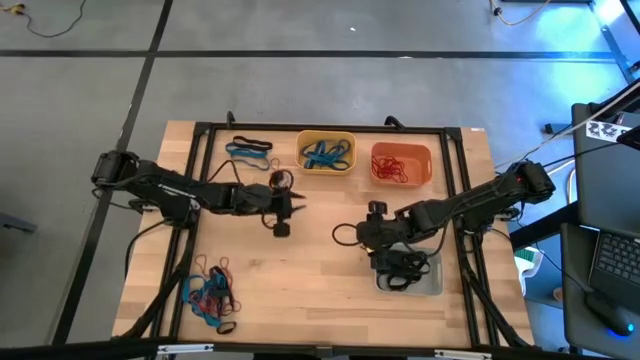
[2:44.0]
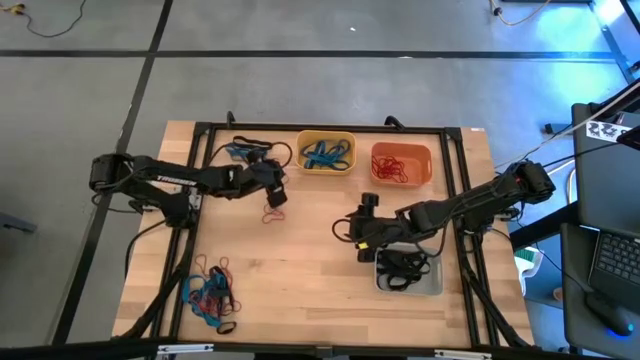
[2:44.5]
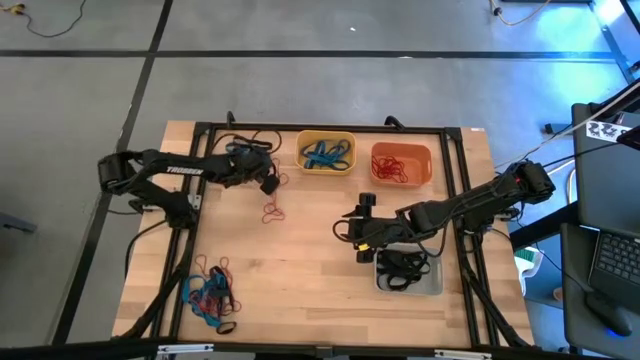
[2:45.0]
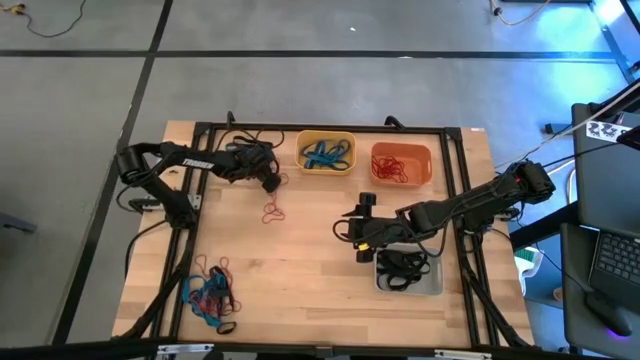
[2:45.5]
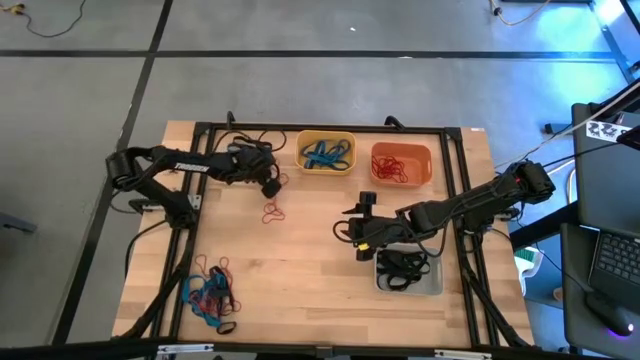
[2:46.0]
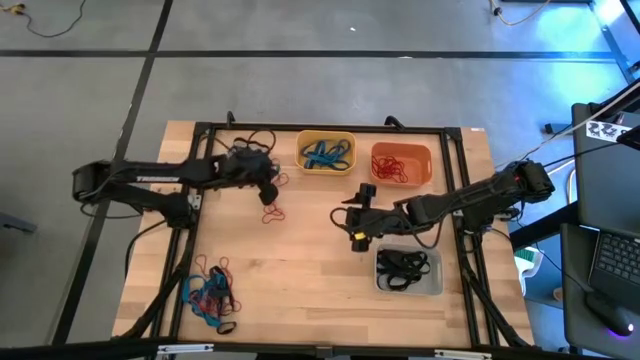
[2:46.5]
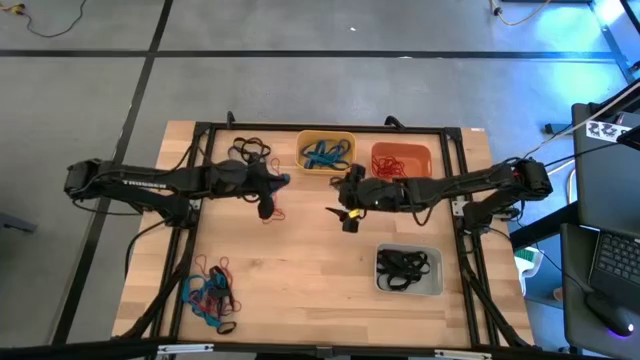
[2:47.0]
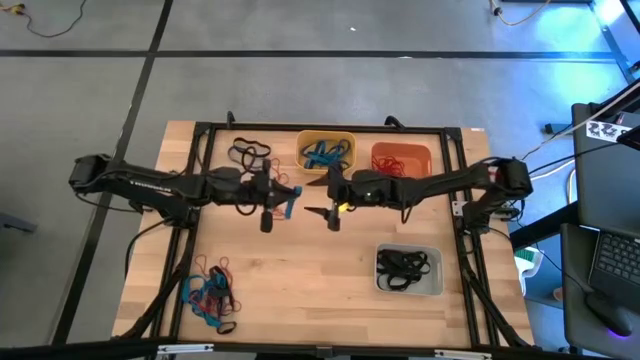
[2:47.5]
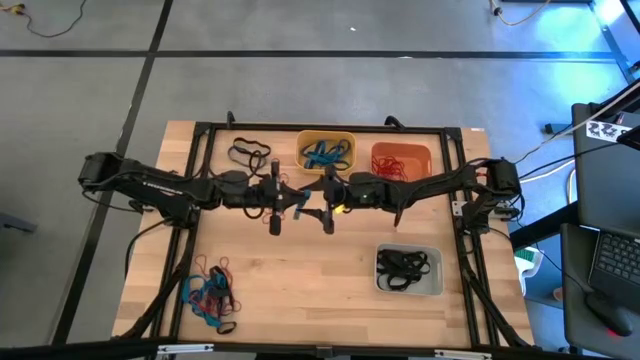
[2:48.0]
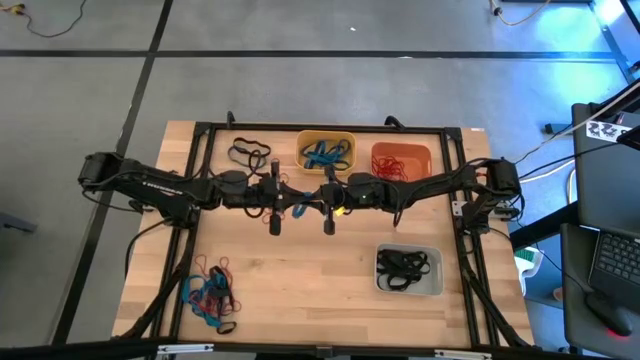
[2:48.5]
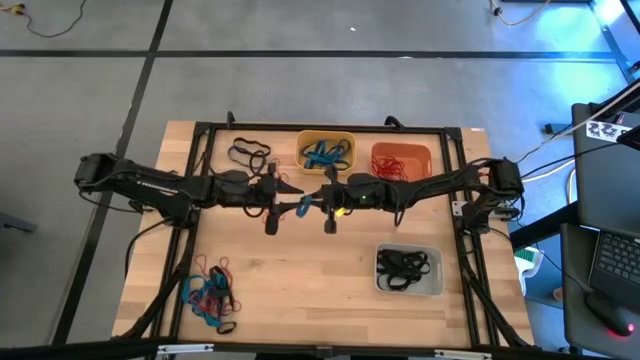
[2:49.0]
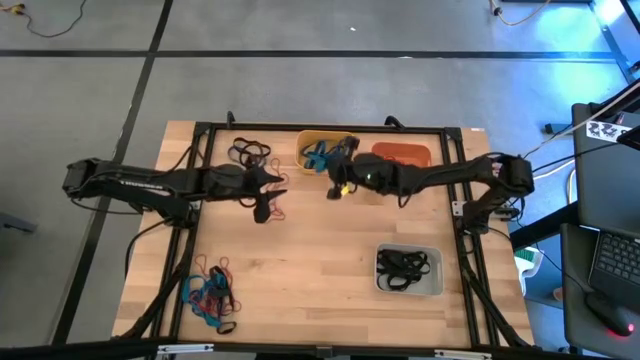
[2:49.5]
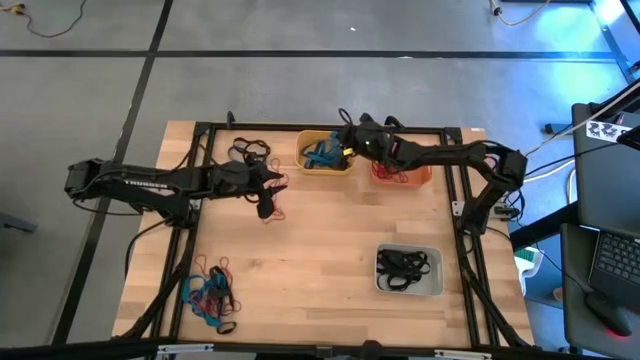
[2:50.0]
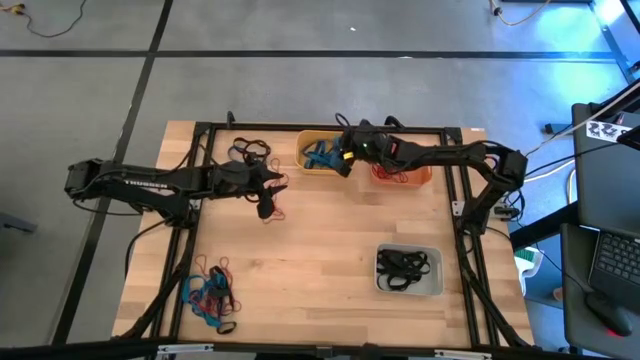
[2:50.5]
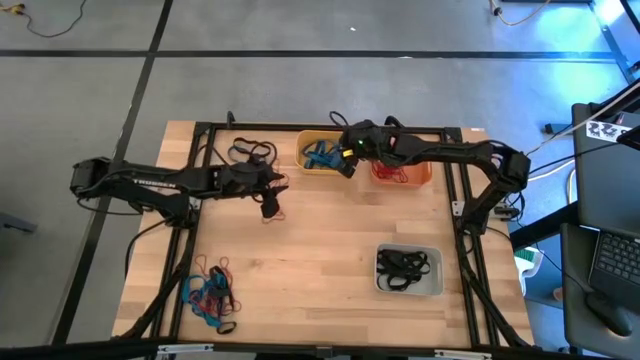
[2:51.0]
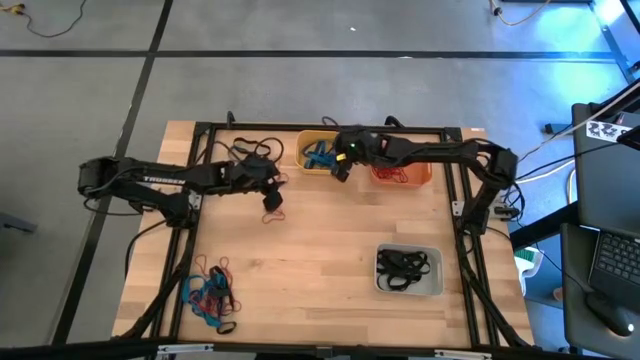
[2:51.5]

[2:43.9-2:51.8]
Task: Sort rubber bands into baskets
Put the blue rubber band into the yellow bin

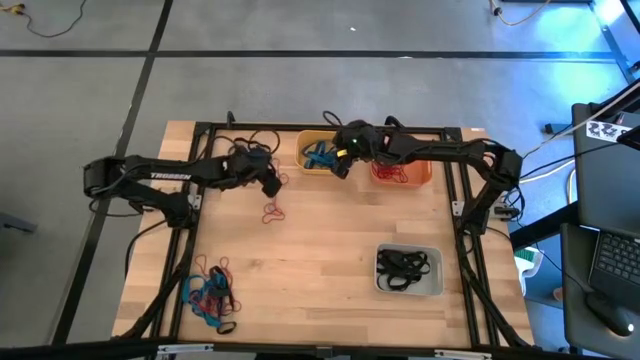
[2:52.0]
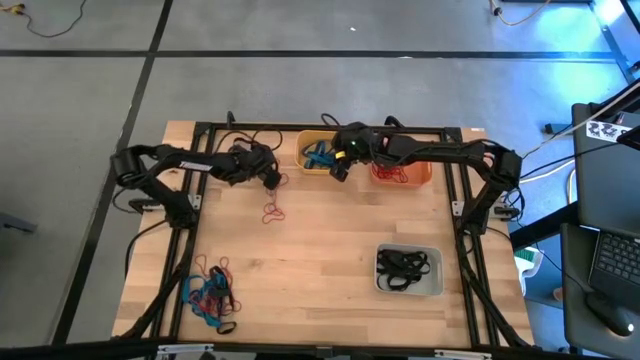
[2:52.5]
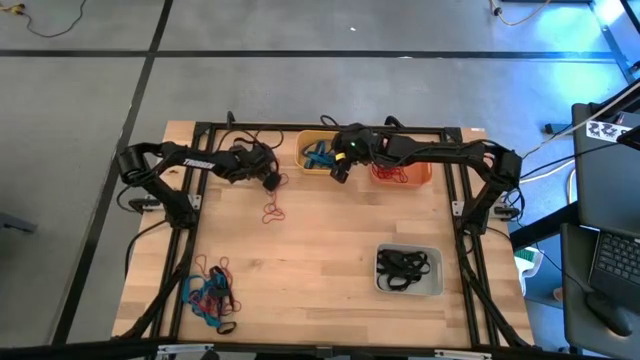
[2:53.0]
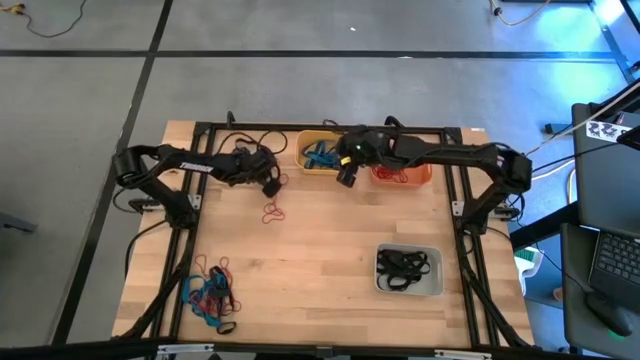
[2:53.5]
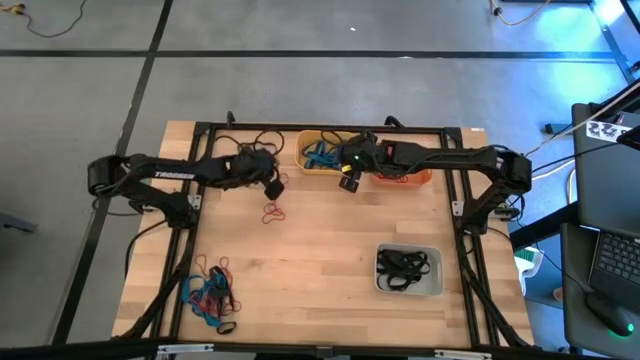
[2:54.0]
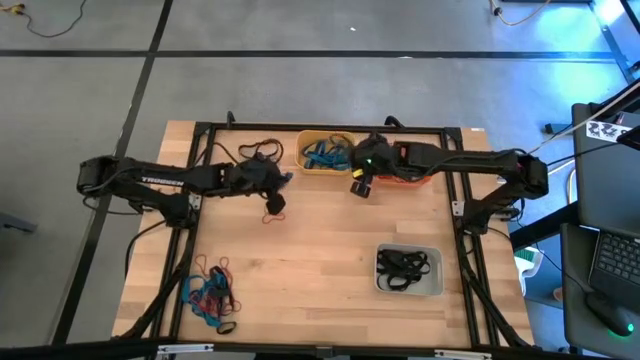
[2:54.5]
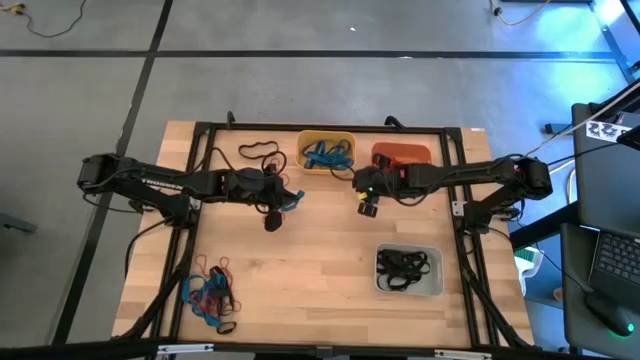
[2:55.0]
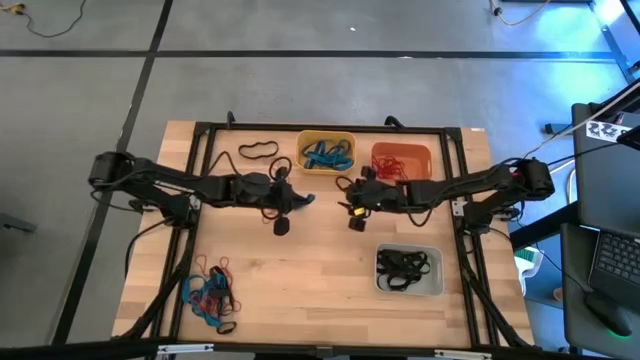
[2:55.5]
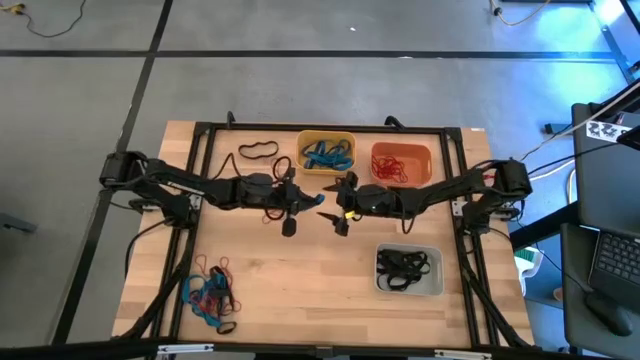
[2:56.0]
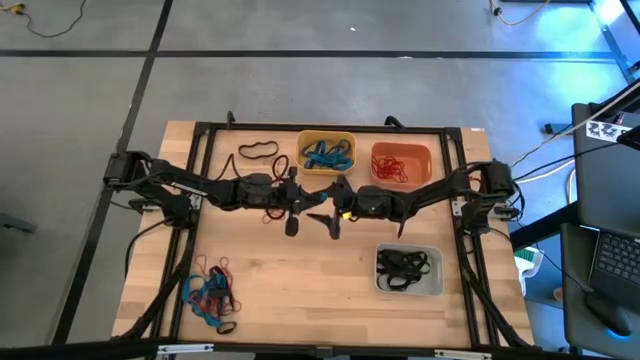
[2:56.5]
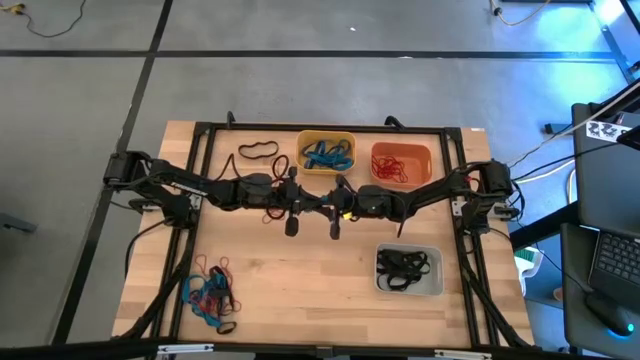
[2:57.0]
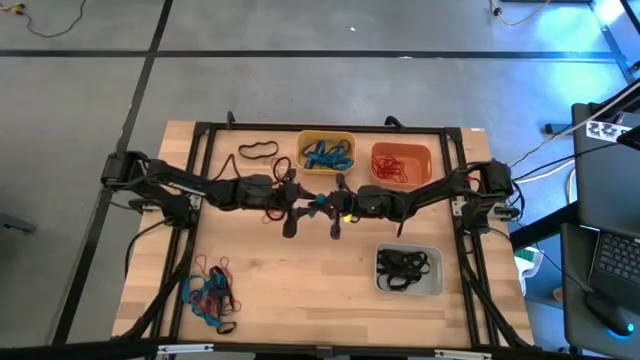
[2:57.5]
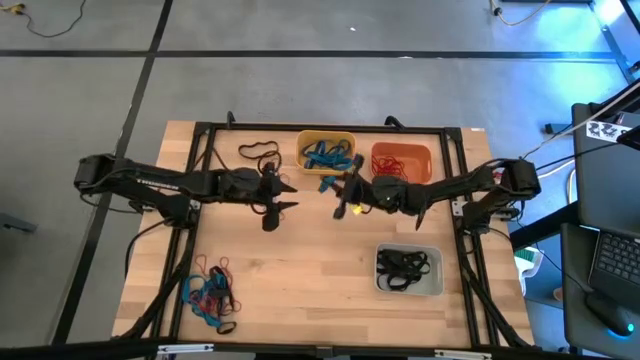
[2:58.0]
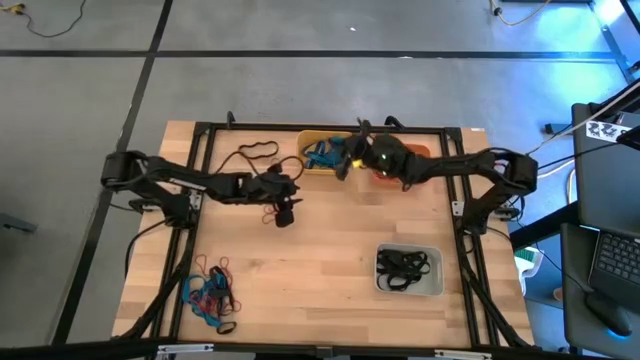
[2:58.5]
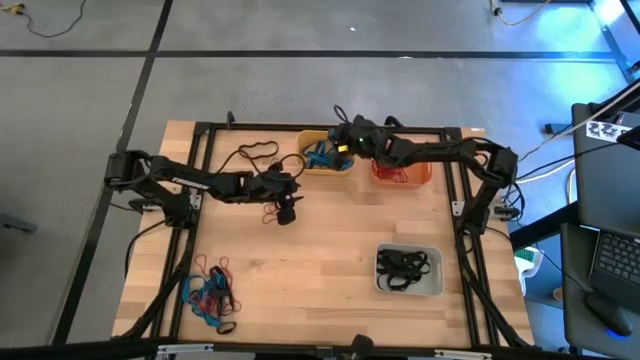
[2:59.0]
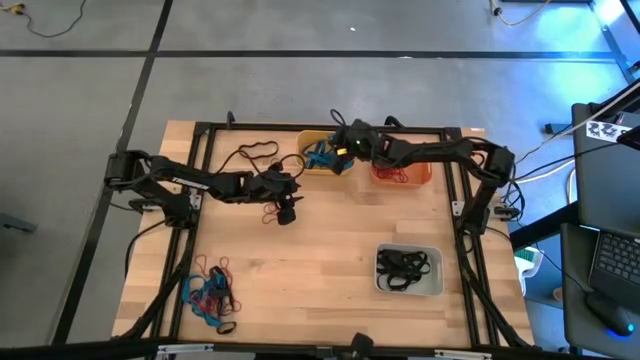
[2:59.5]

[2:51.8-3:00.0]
Put the blue rubber band into the yellow bin

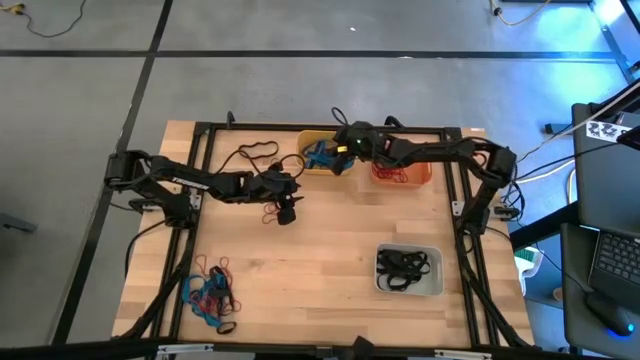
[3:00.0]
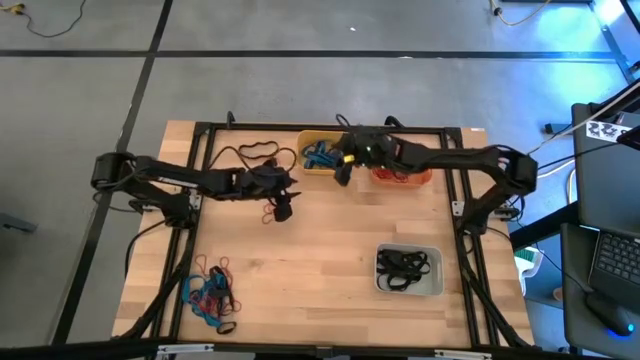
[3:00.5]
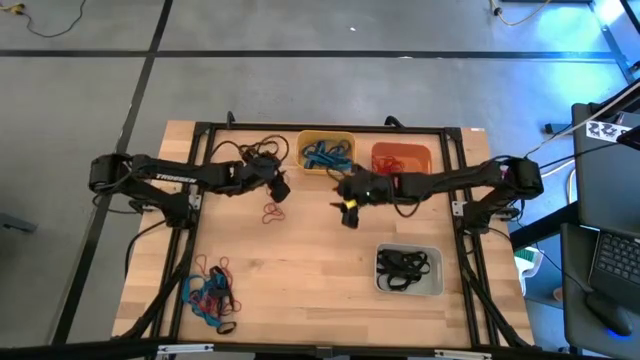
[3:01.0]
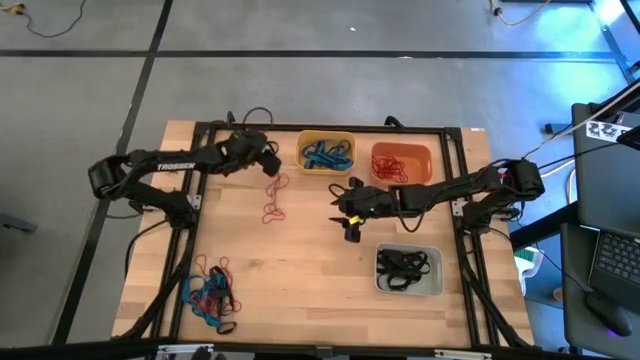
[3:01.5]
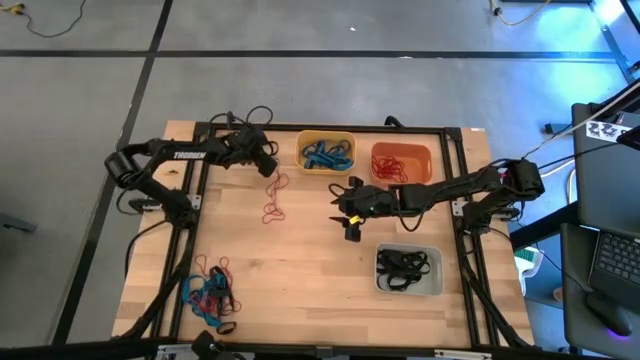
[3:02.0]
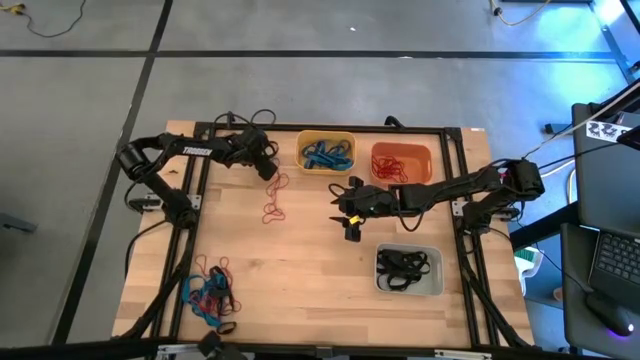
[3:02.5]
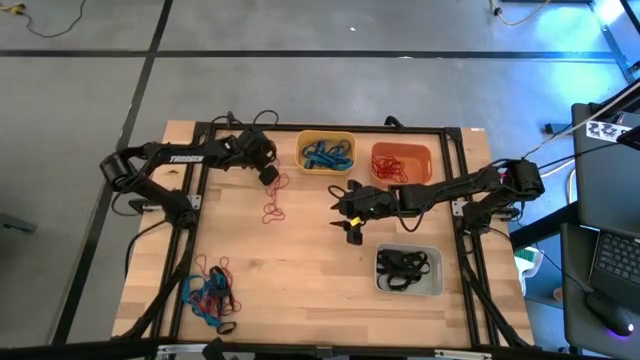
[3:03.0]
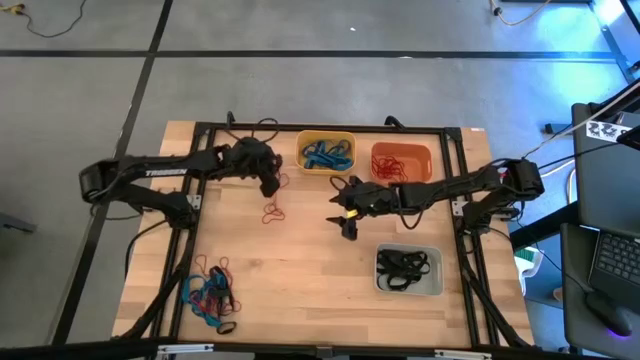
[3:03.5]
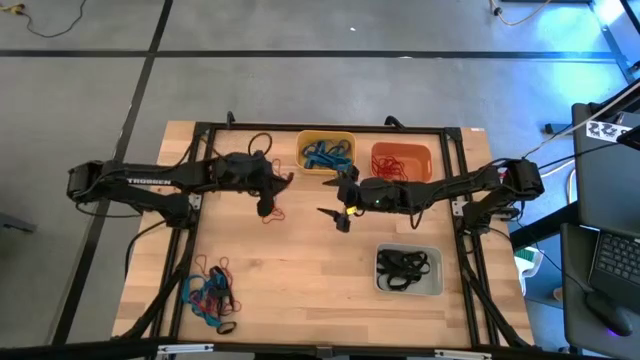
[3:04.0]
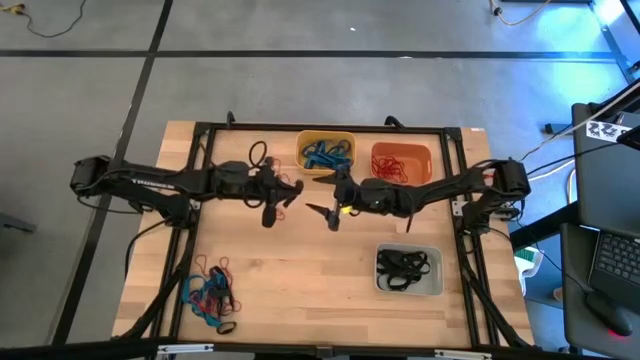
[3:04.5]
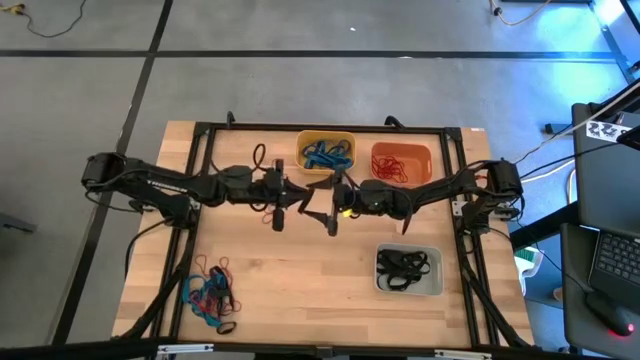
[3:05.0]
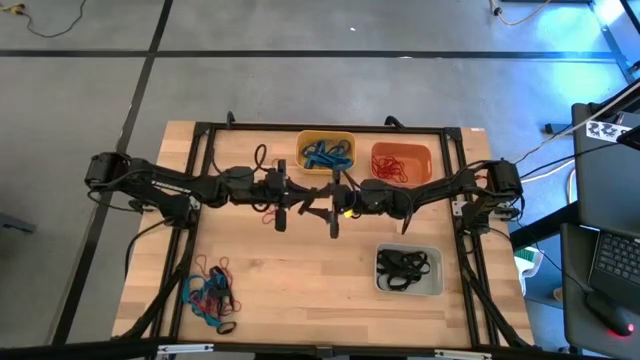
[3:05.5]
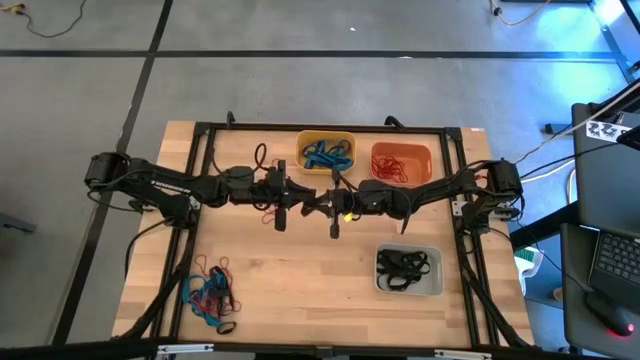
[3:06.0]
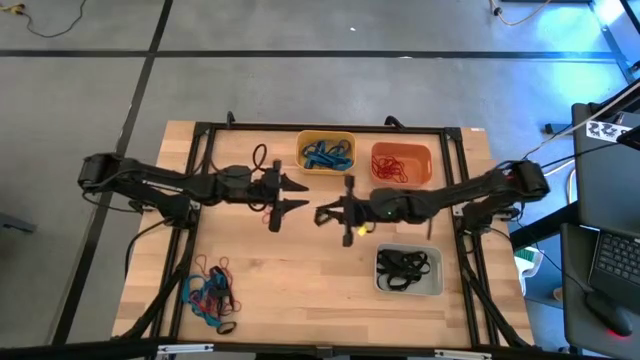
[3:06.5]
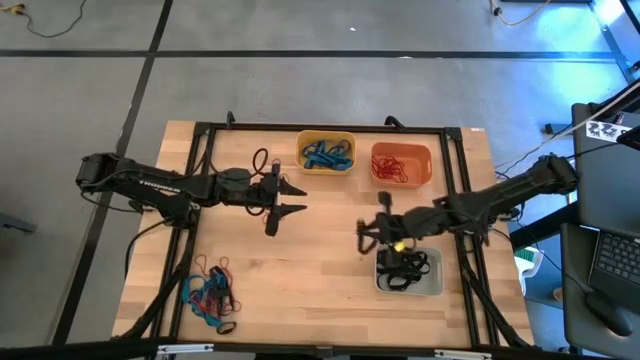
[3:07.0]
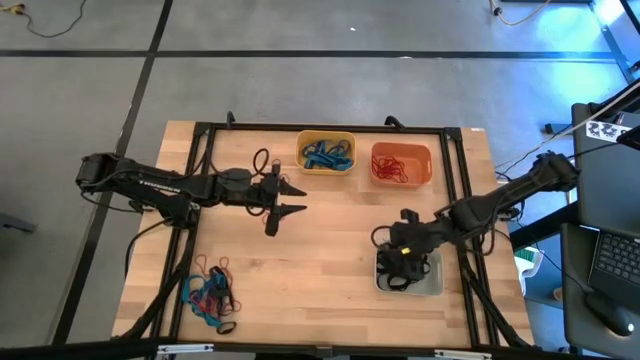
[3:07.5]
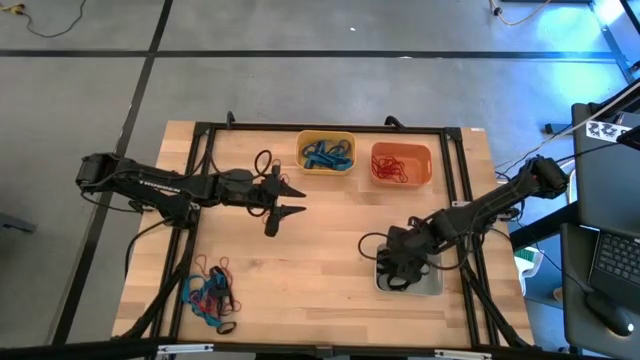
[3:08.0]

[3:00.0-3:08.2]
Put the black rubber band into the white bin
